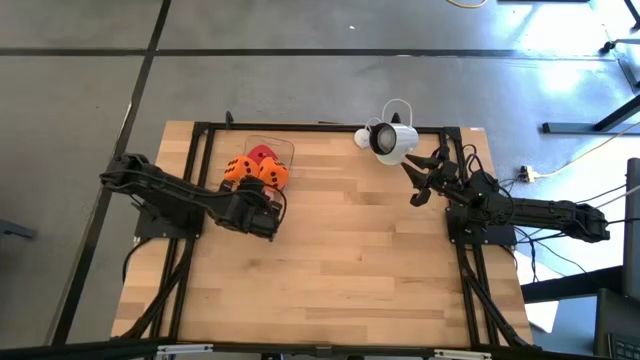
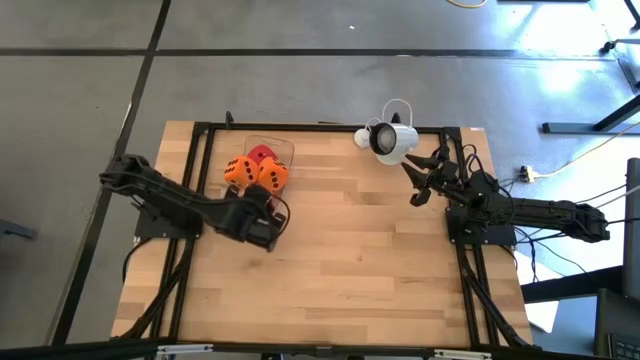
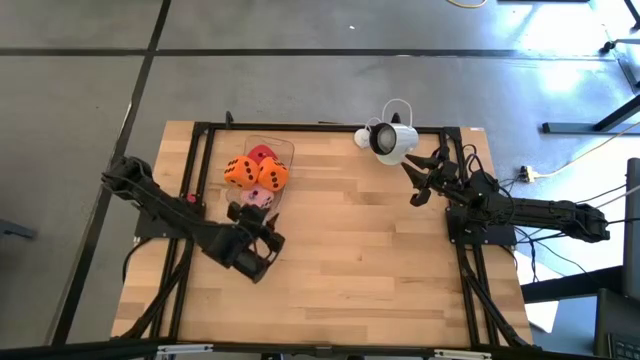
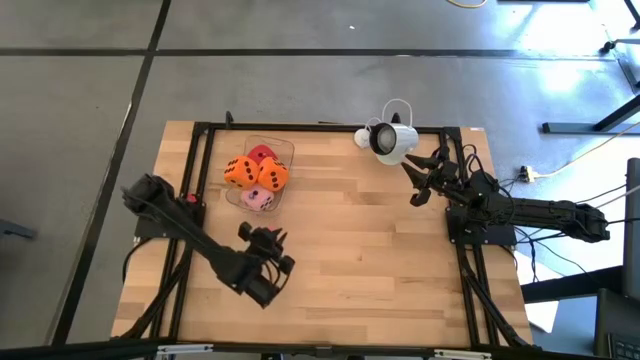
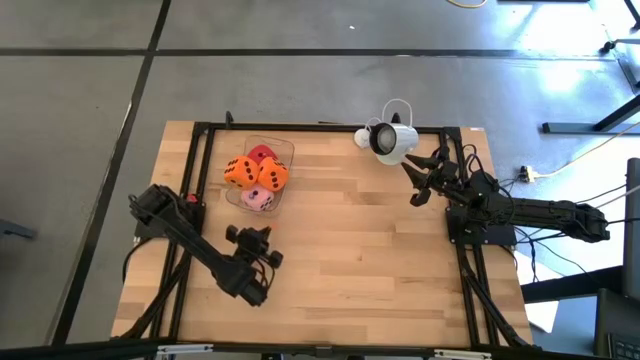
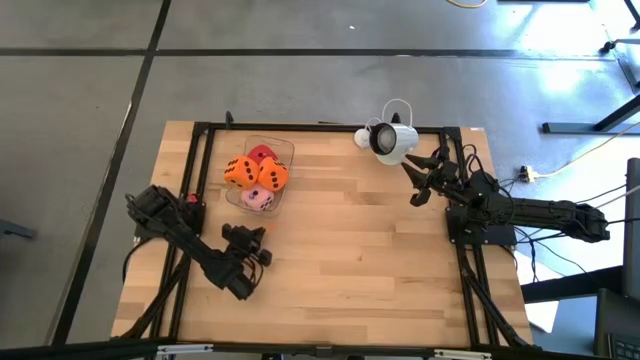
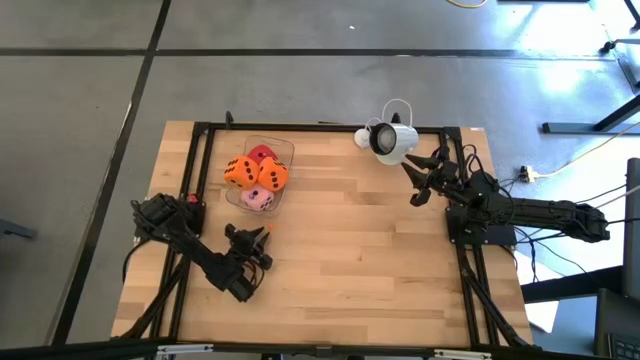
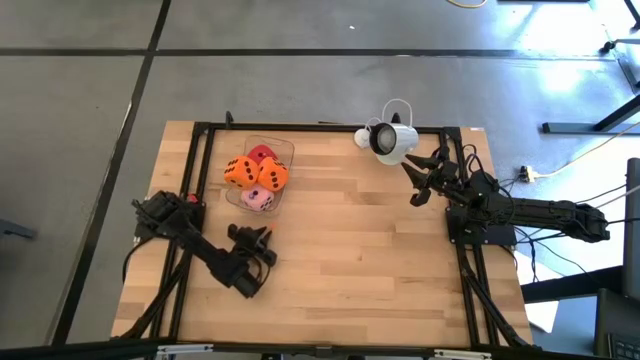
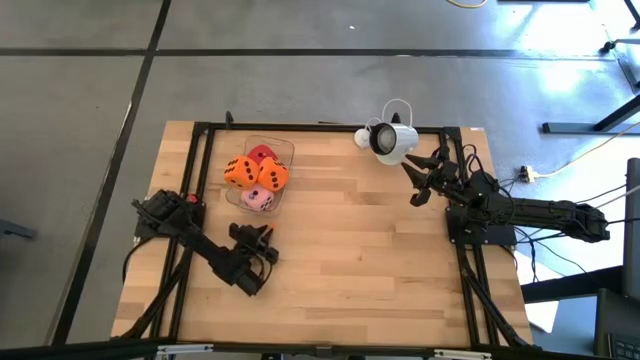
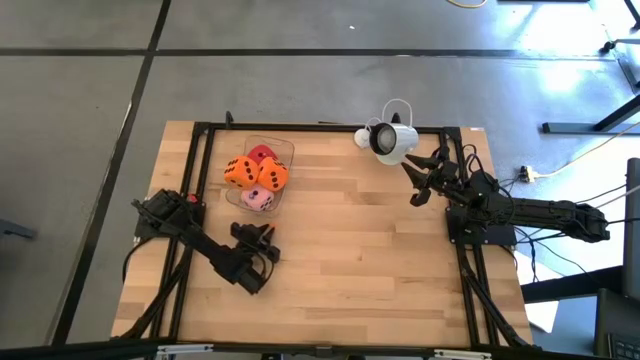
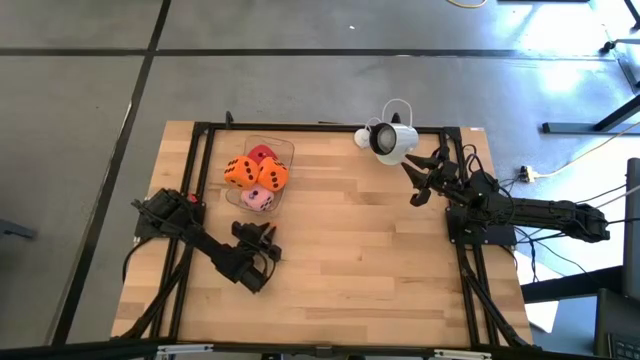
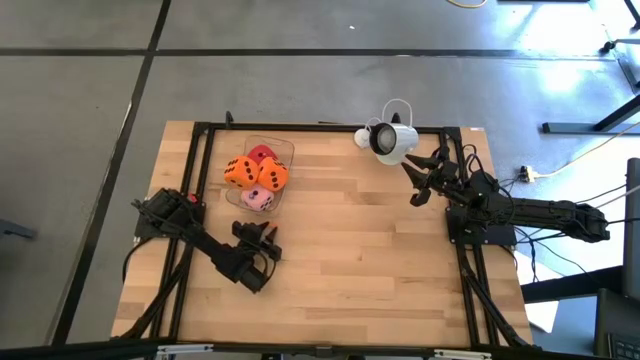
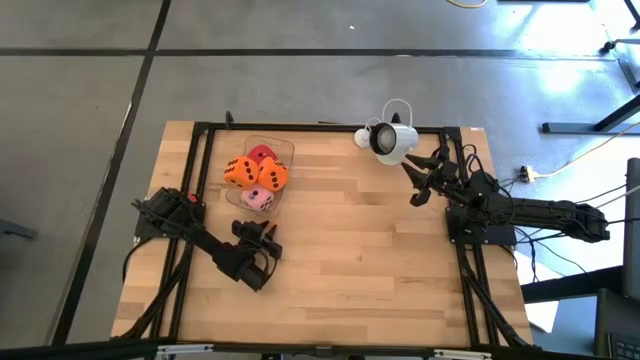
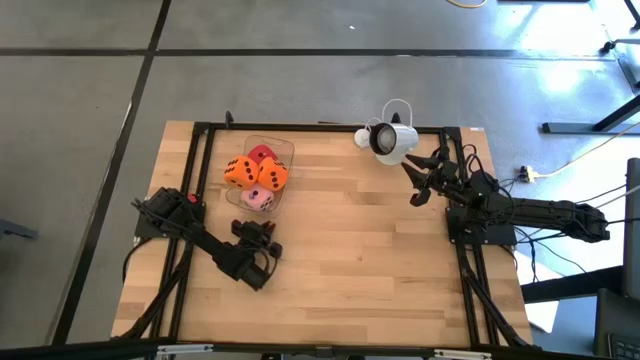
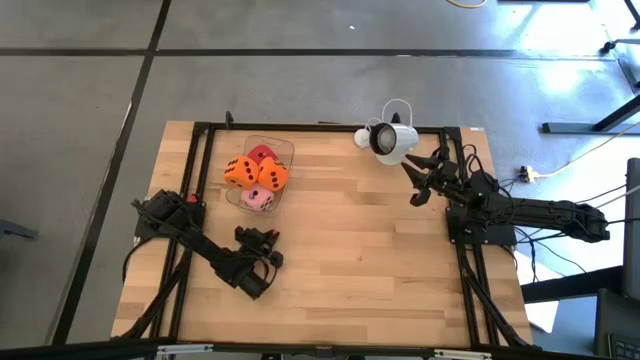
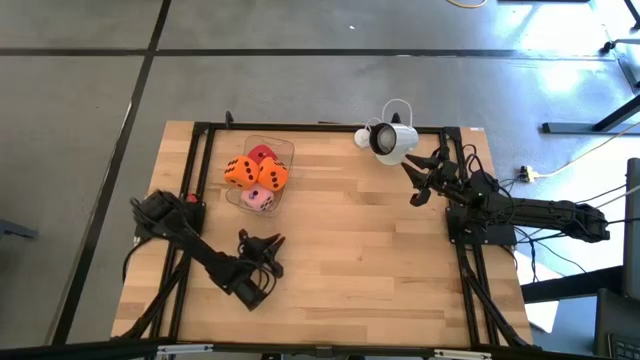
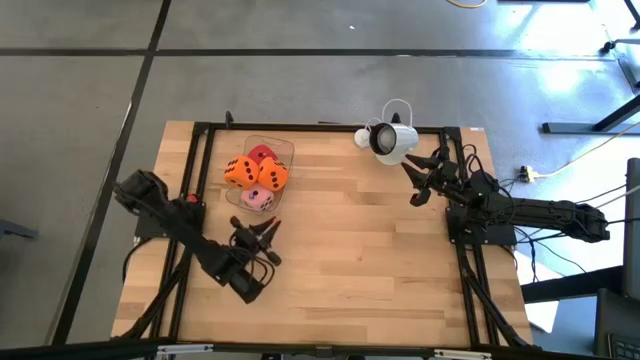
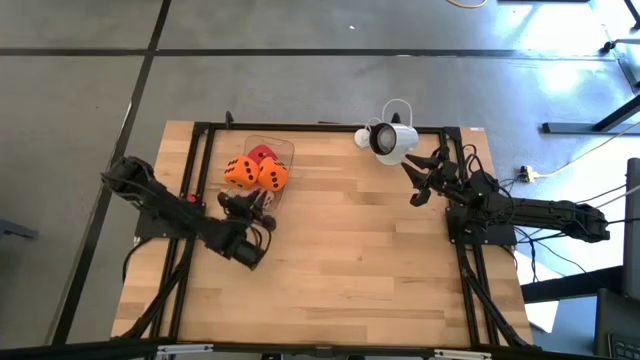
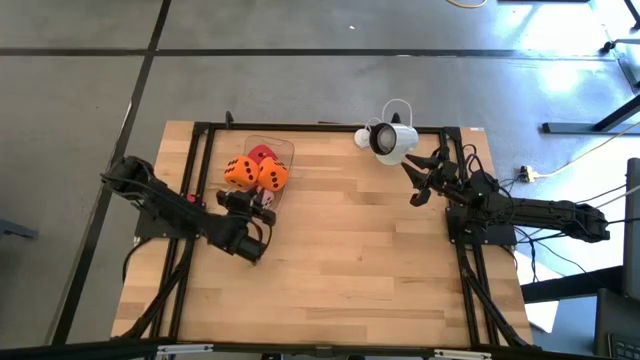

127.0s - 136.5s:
Task: Pick & Place Dice
Put the small orange die into the transparent bin

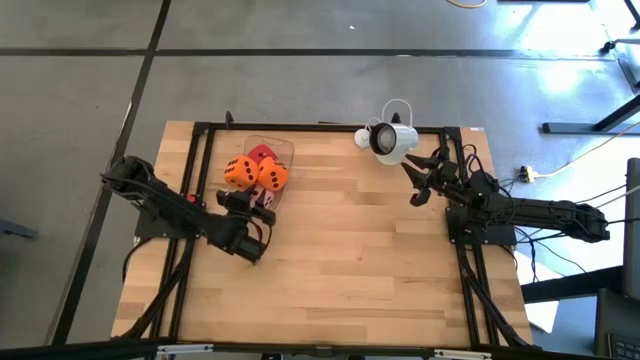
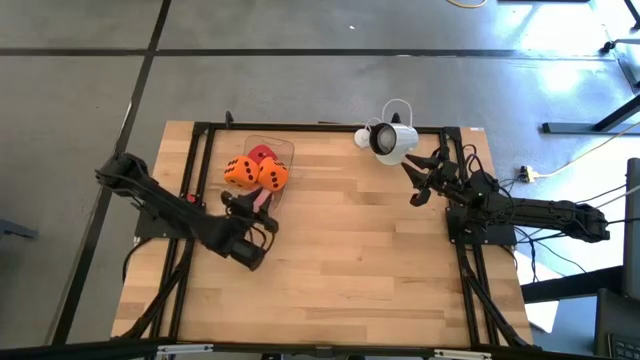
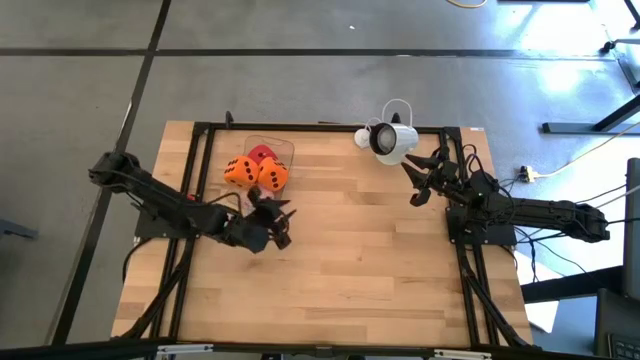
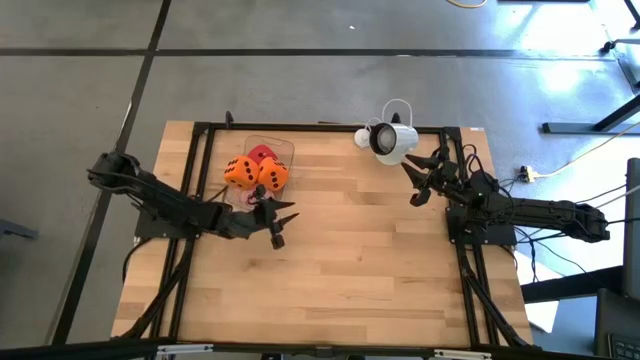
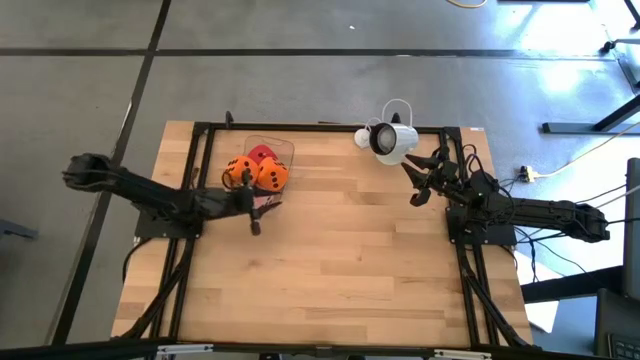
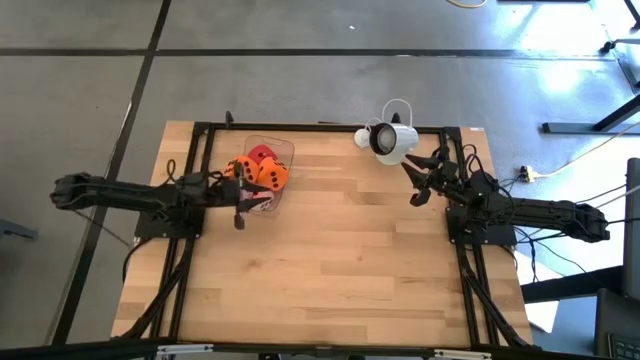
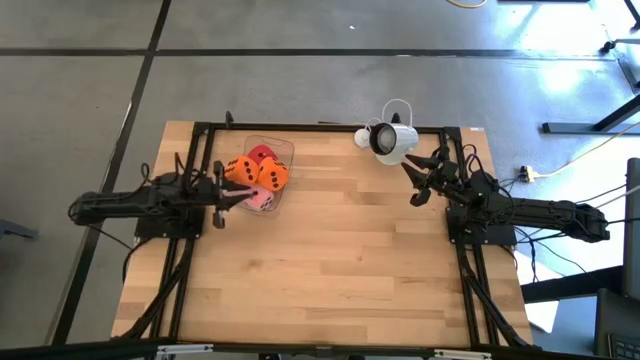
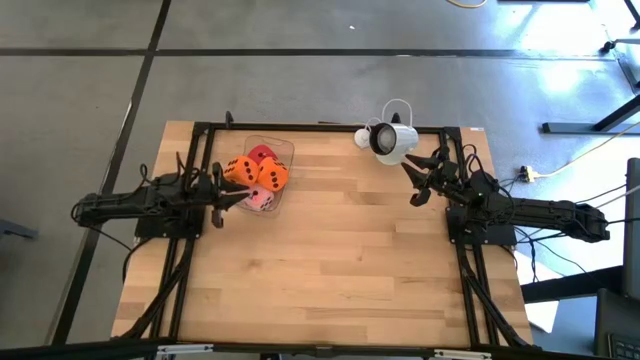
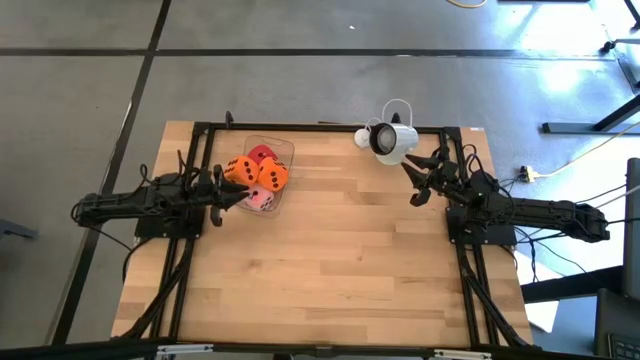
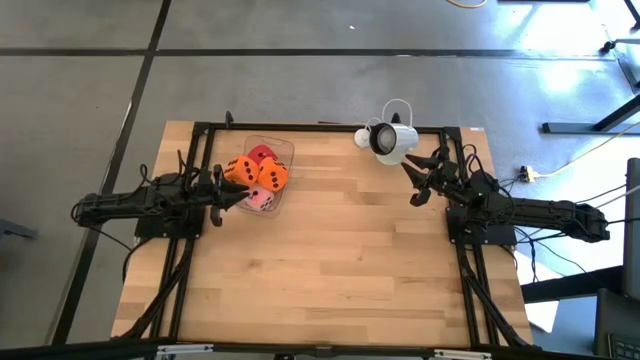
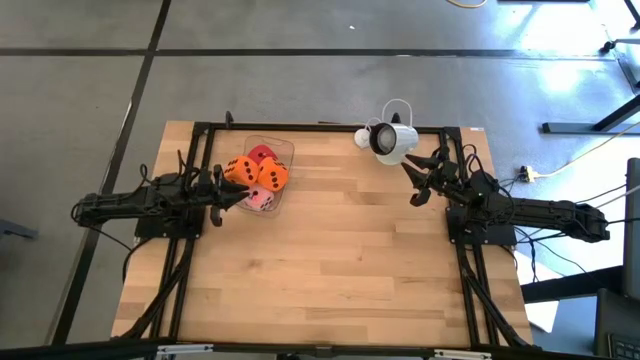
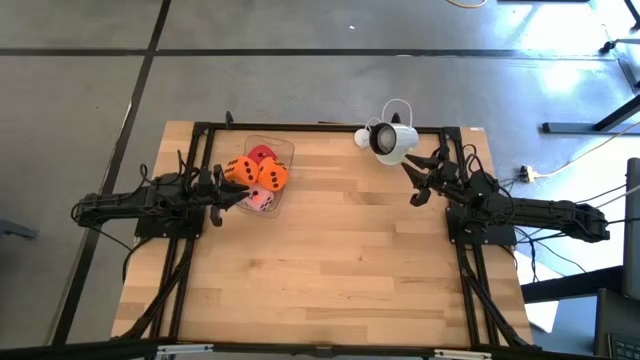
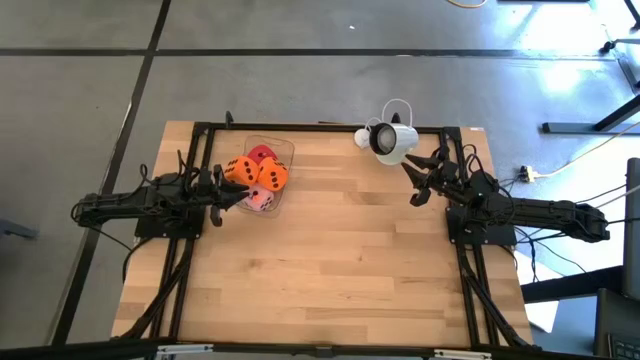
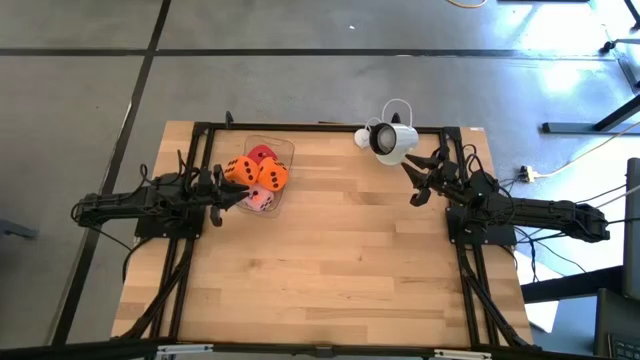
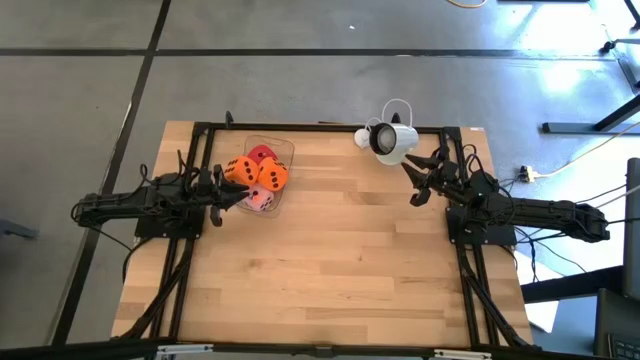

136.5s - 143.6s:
Return to Home Position

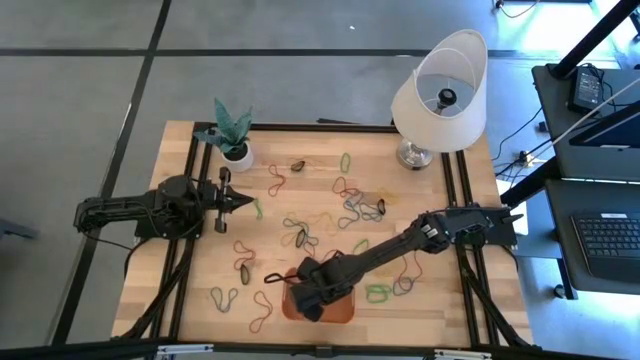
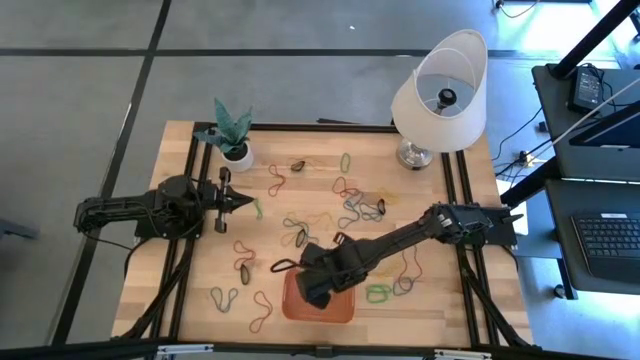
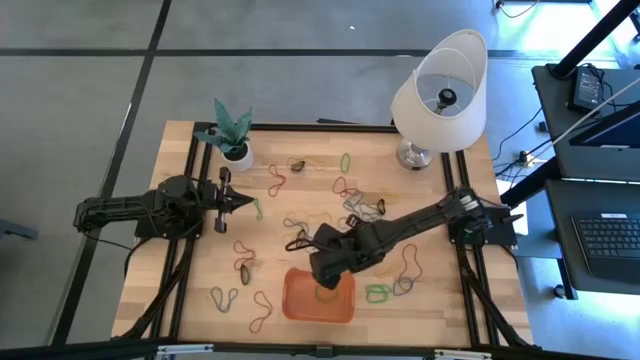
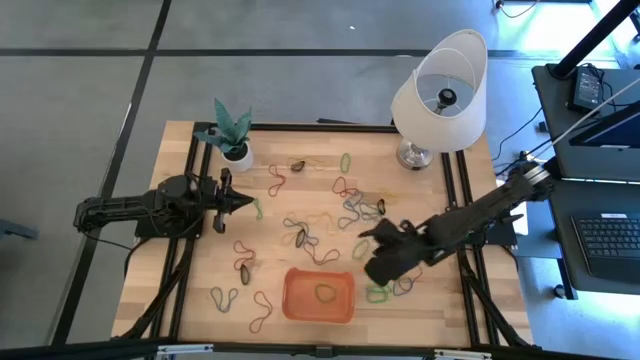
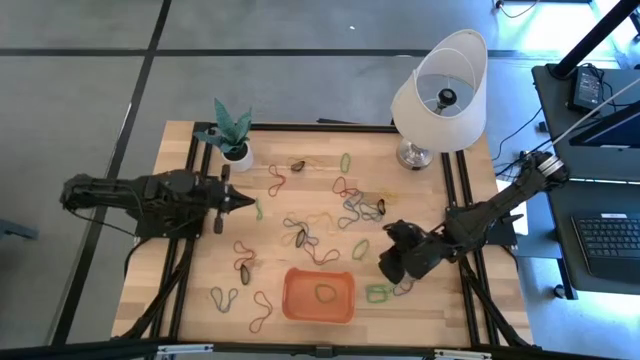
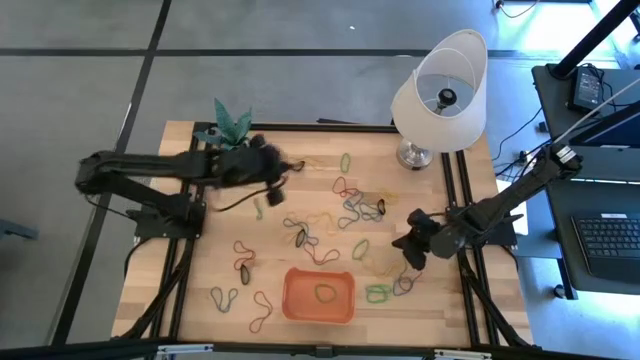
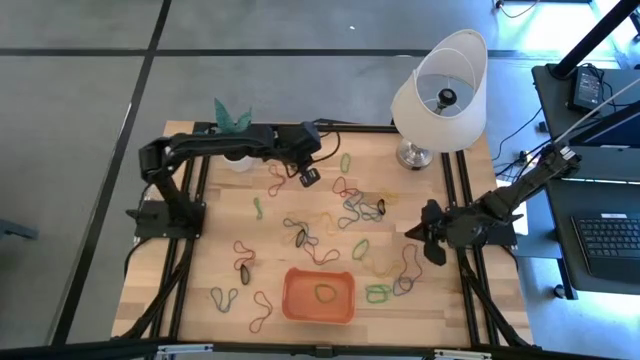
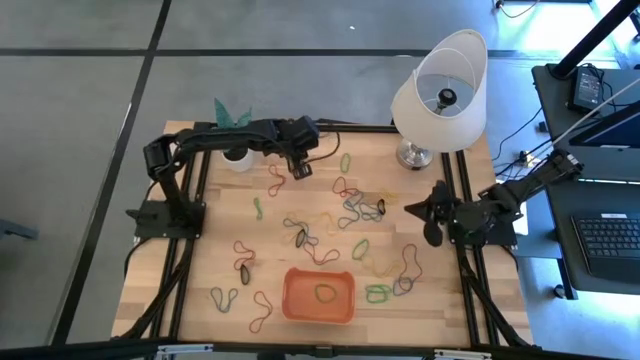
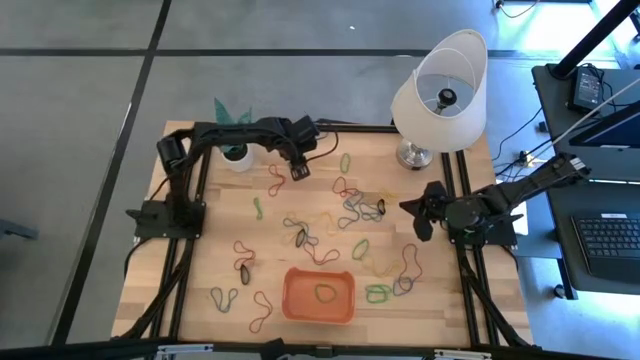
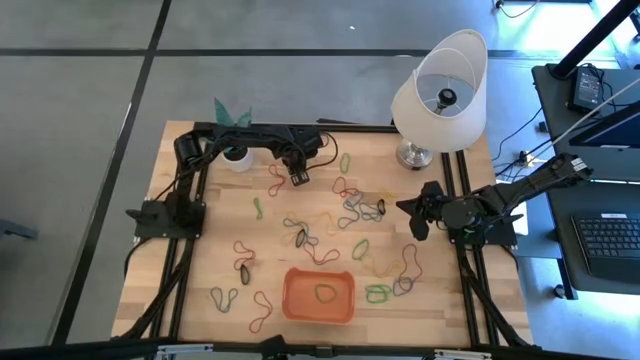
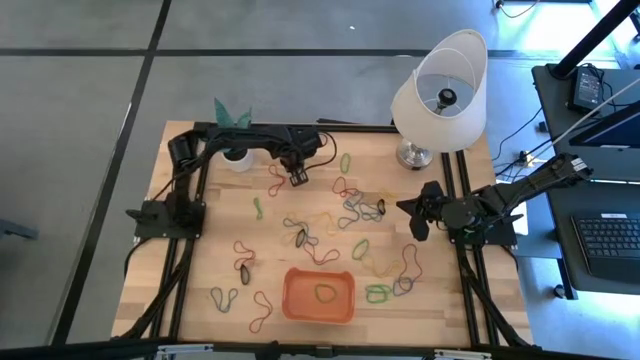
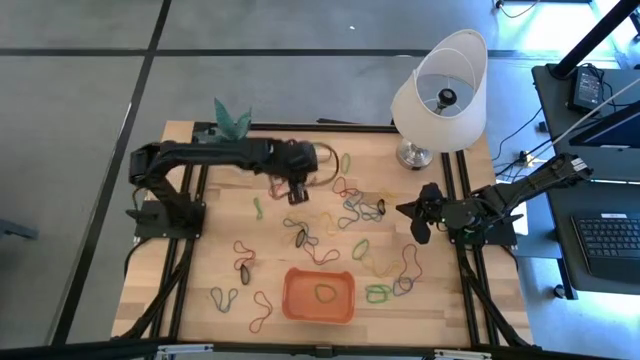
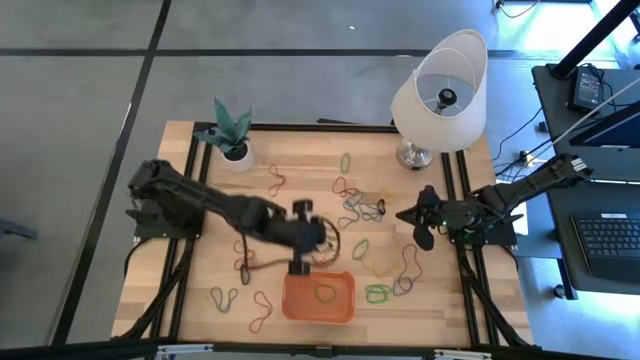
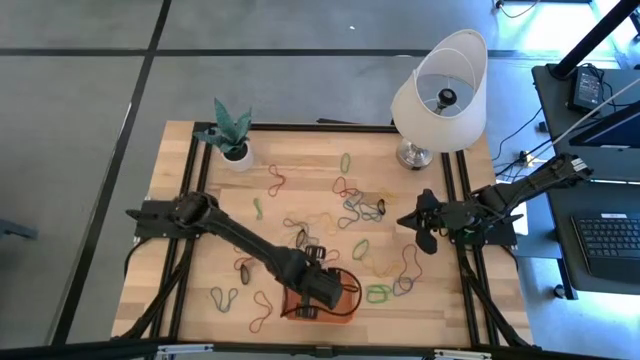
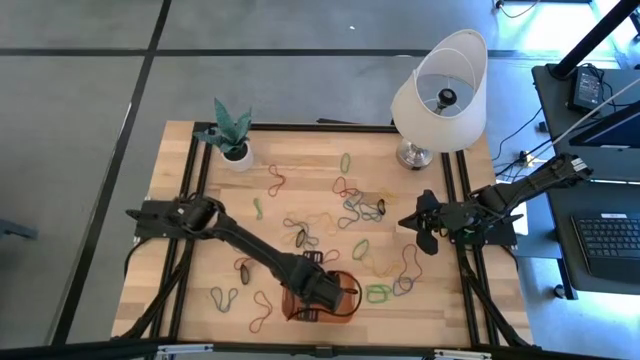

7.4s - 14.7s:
Task: Pick and place rubber bands into bin
Put the black rubber band into the bin
